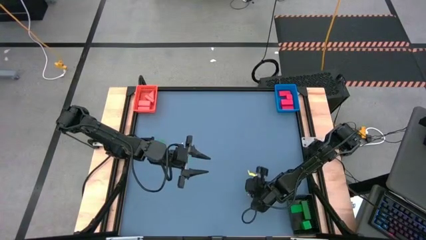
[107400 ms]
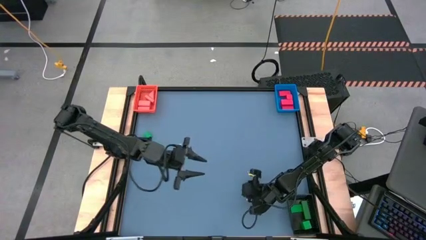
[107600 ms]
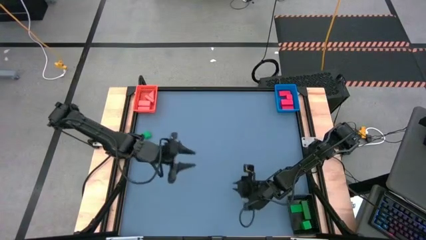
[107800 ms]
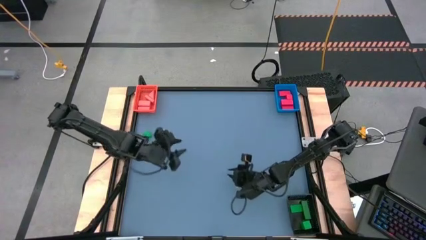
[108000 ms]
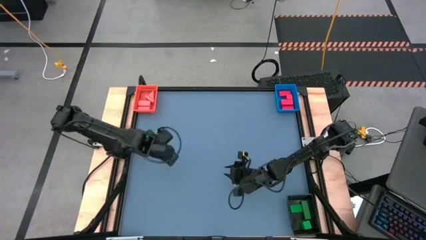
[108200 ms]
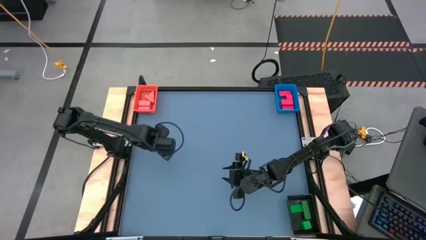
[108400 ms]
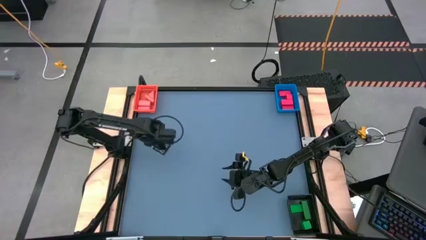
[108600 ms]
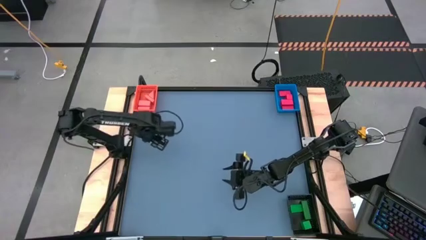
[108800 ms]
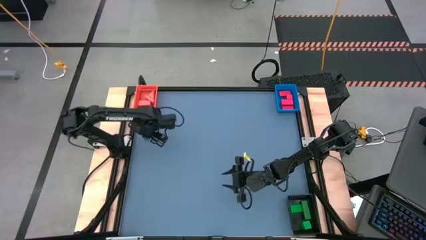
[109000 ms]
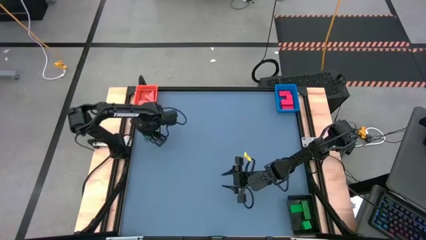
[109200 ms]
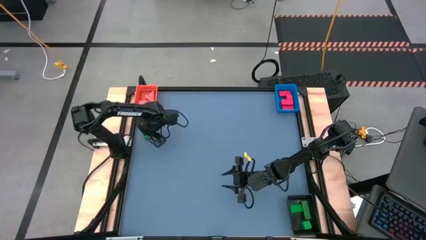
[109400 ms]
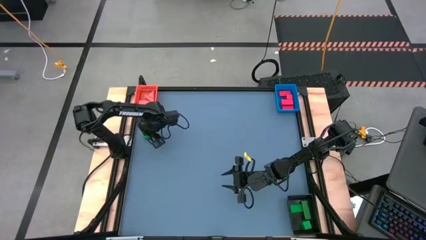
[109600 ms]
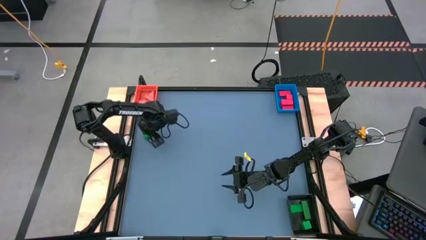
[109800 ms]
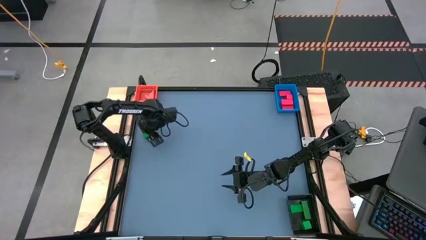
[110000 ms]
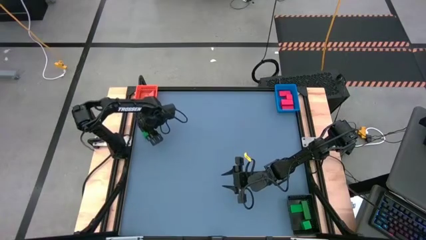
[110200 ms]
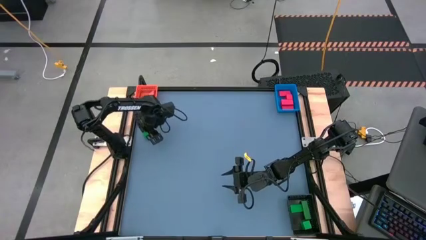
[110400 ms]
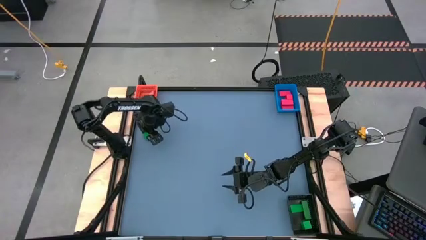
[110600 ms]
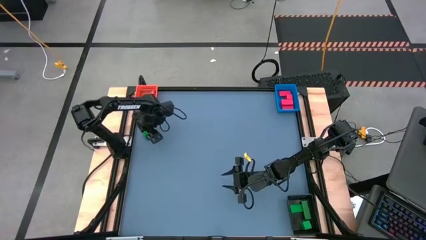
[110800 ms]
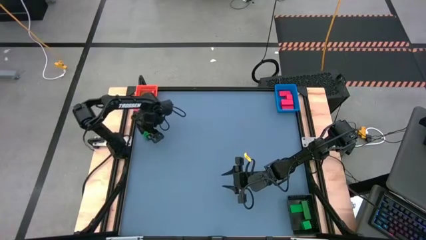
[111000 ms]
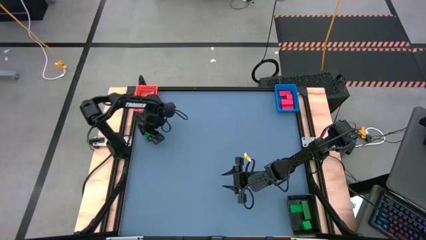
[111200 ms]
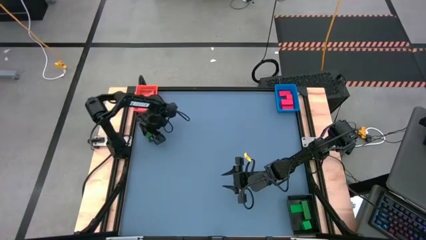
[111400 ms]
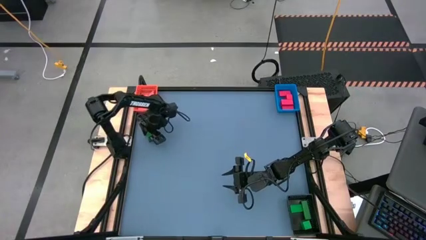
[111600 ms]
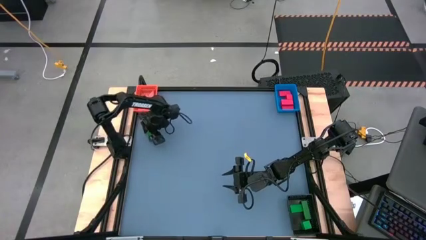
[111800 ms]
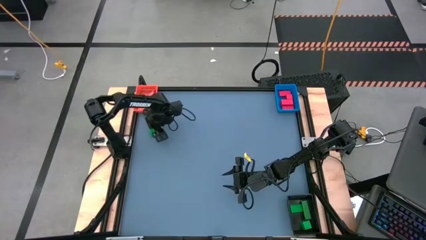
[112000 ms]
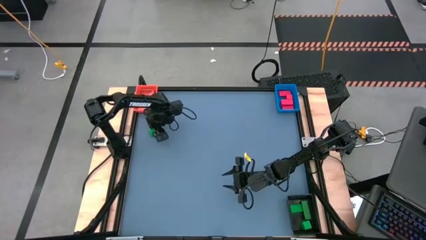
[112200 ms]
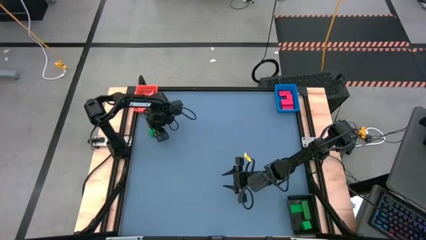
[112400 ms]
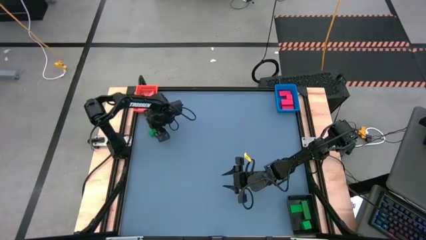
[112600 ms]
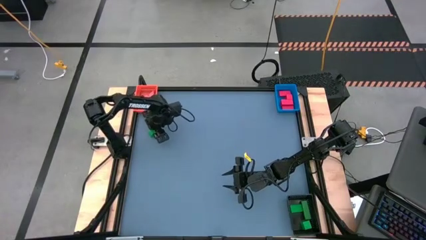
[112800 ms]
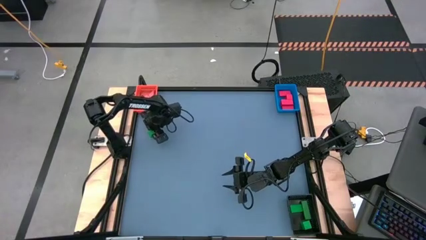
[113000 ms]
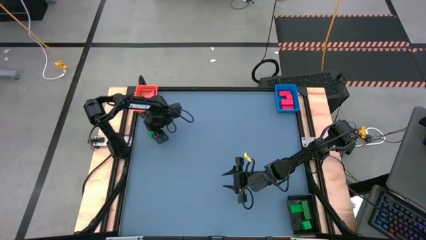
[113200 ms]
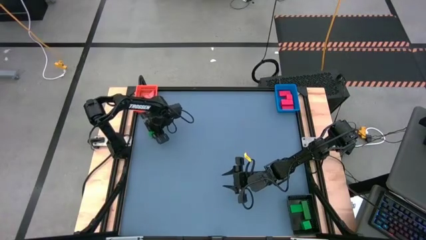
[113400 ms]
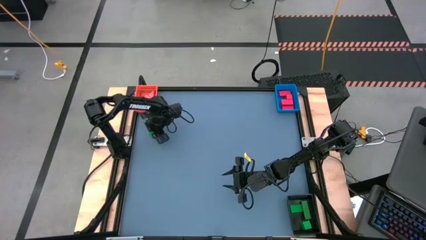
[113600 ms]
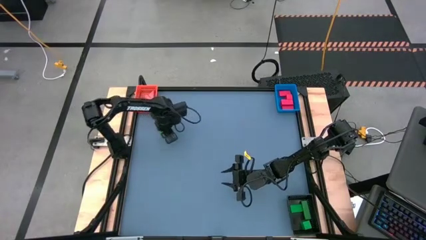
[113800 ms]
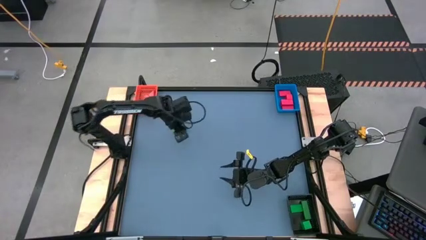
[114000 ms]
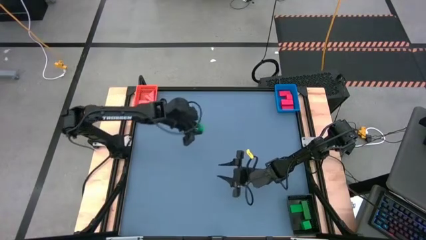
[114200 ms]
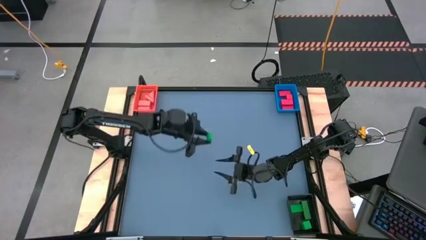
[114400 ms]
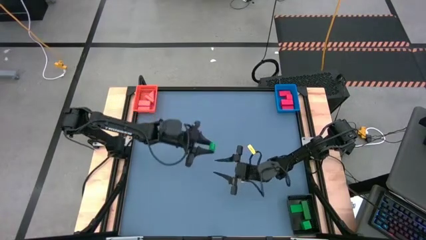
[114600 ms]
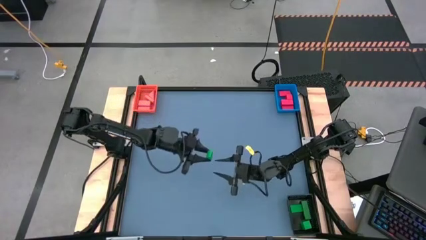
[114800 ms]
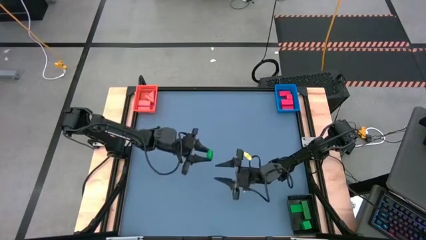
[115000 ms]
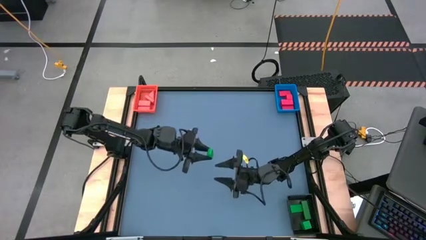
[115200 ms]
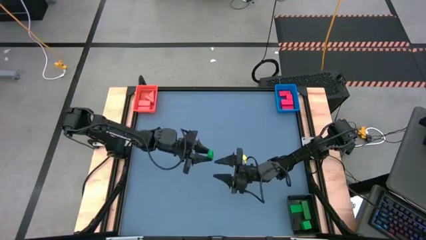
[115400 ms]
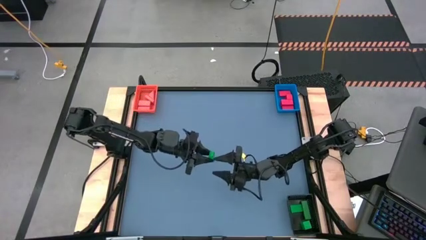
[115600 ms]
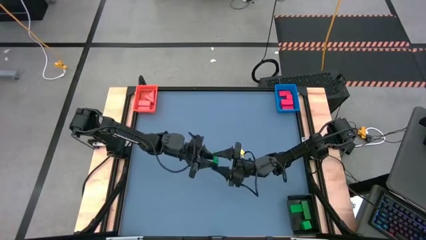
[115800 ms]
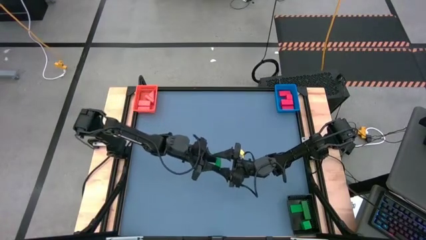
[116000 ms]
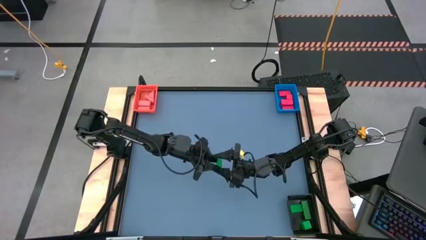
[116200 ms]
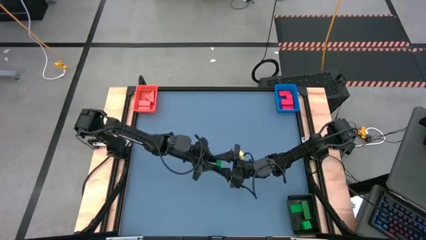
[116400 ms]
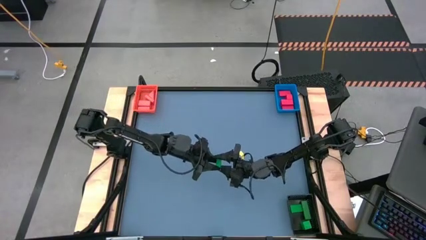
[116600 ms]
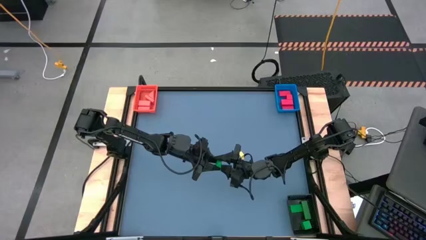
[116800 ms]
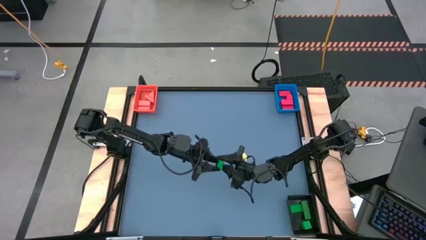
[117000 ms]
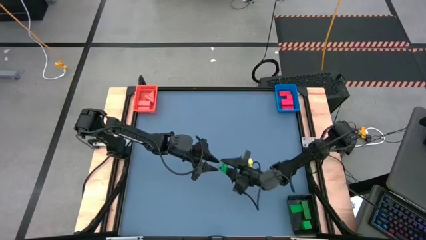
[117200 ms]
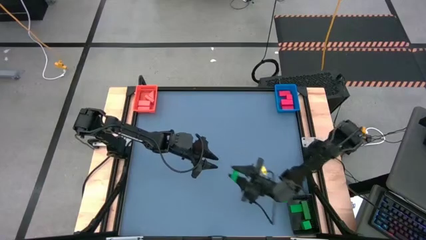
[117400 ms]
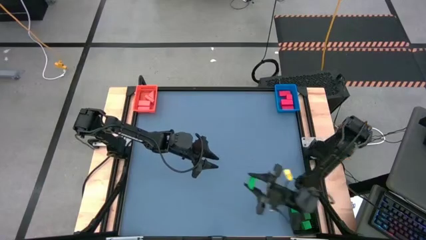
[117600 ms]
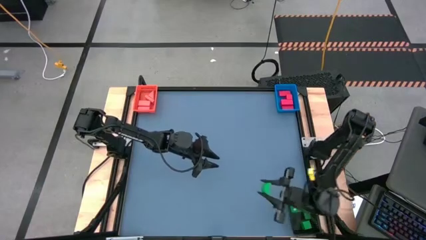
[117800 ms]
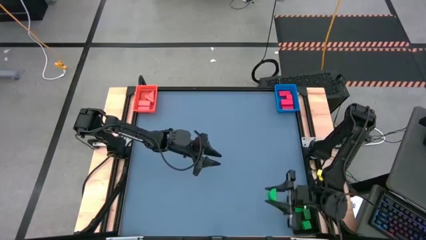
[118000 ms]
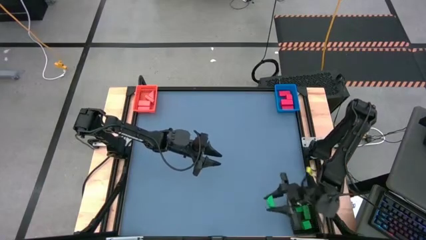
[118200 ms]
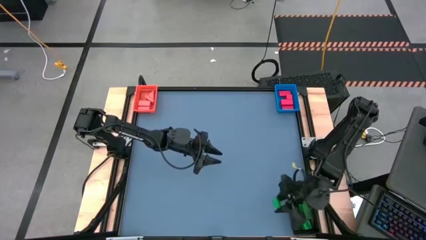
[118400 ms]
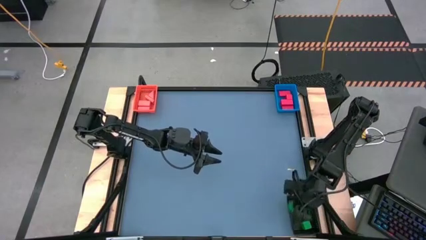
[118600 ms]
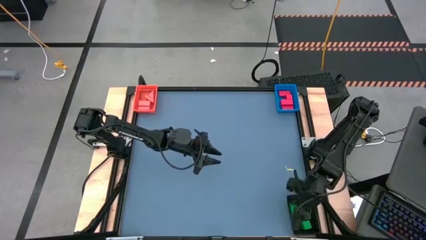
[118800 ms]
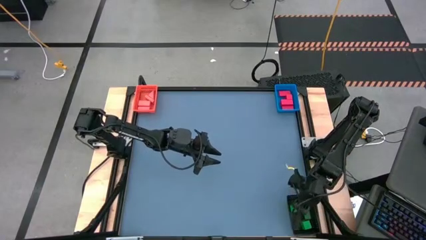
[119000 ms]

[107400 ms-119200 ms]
Task: Sort & place blocks by color
Put the green block into the black bin
